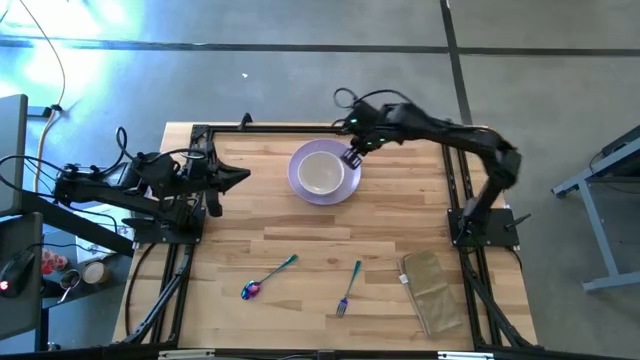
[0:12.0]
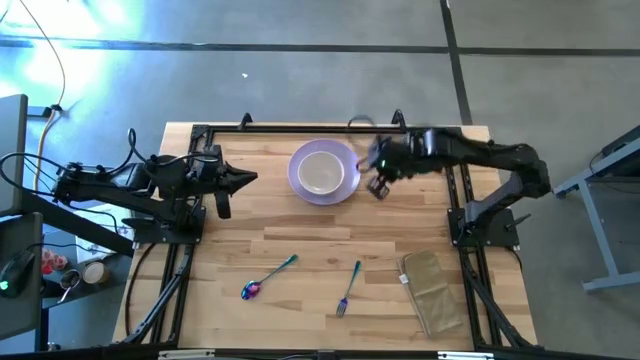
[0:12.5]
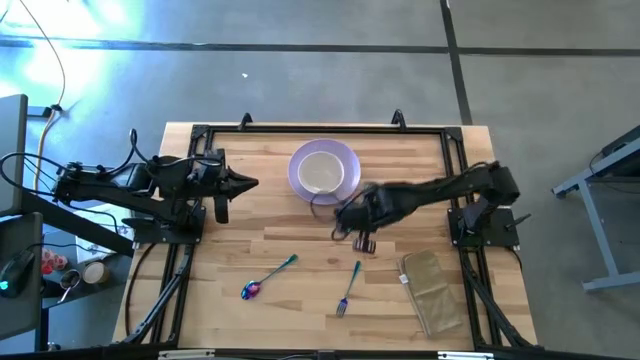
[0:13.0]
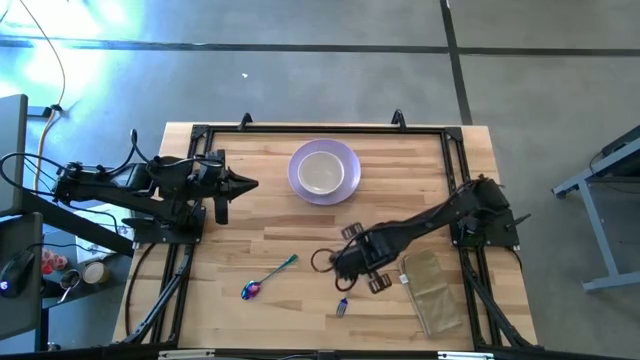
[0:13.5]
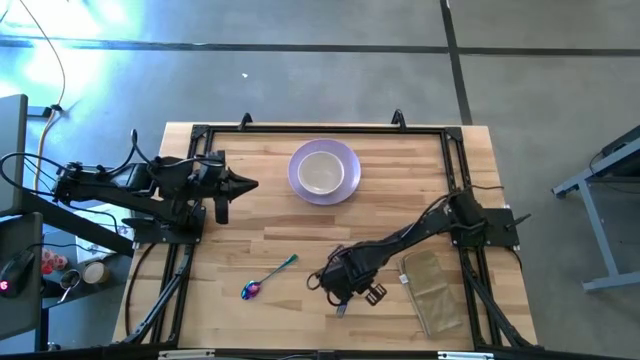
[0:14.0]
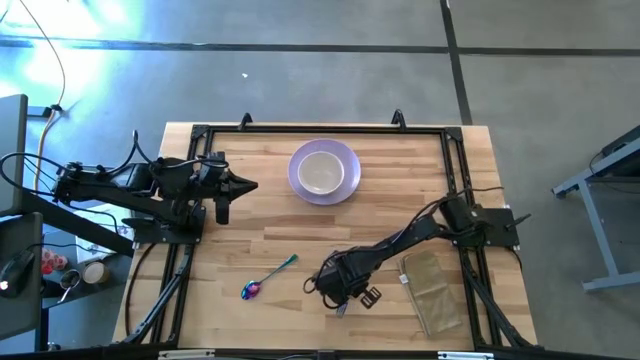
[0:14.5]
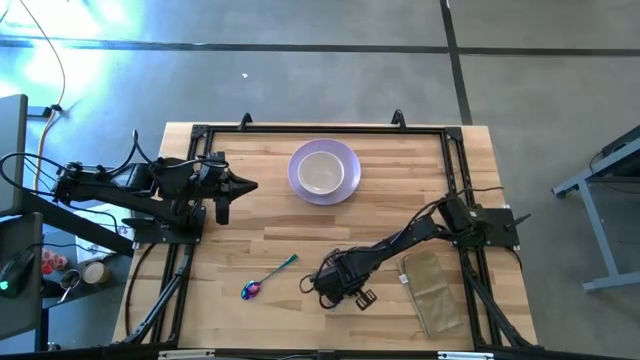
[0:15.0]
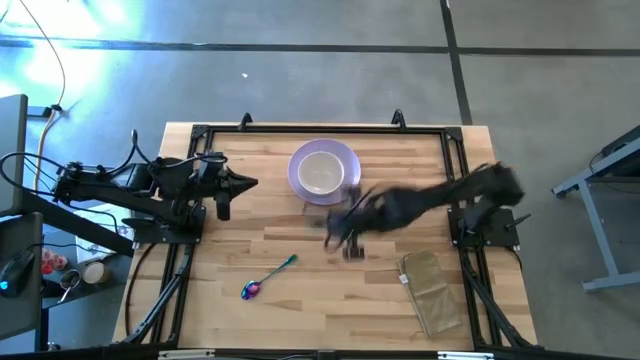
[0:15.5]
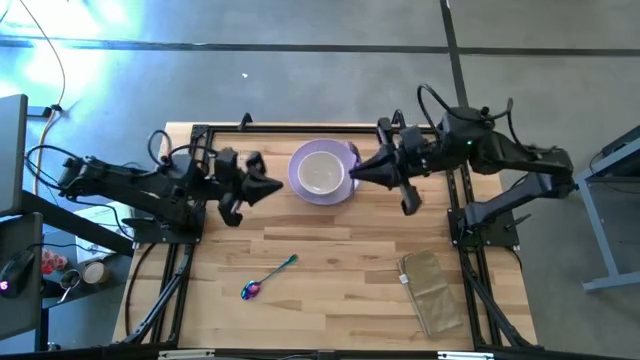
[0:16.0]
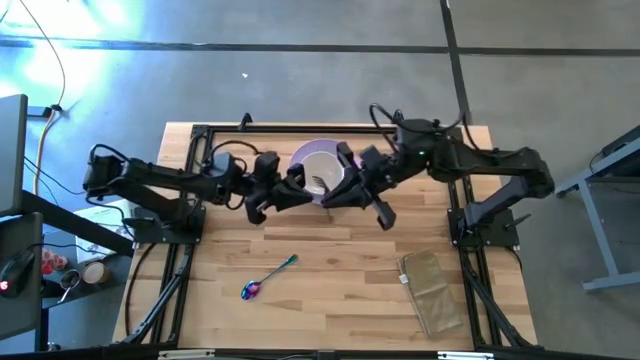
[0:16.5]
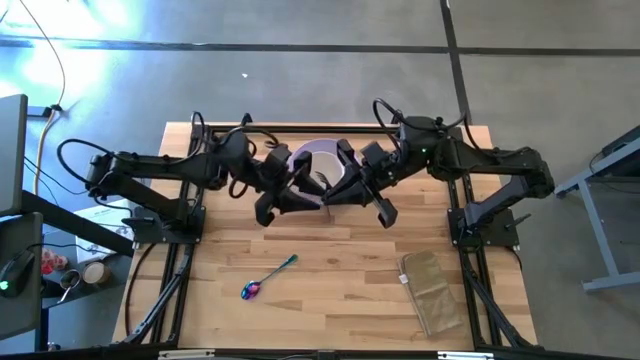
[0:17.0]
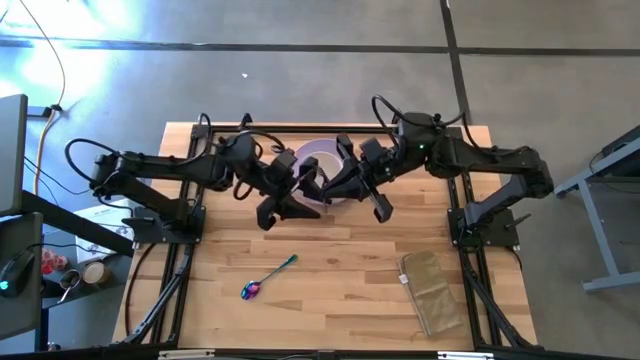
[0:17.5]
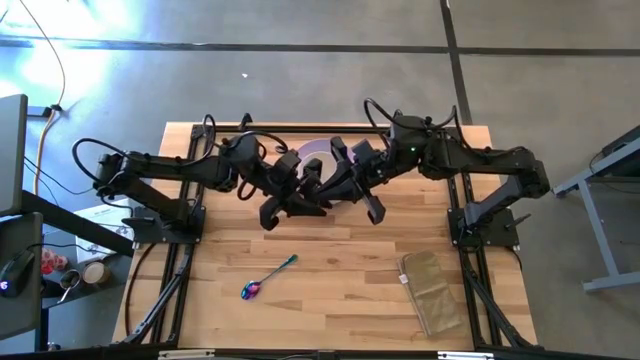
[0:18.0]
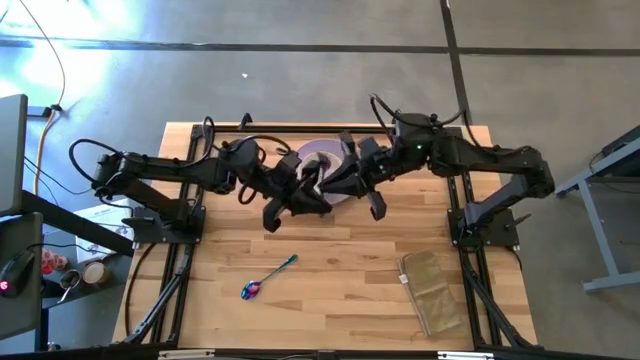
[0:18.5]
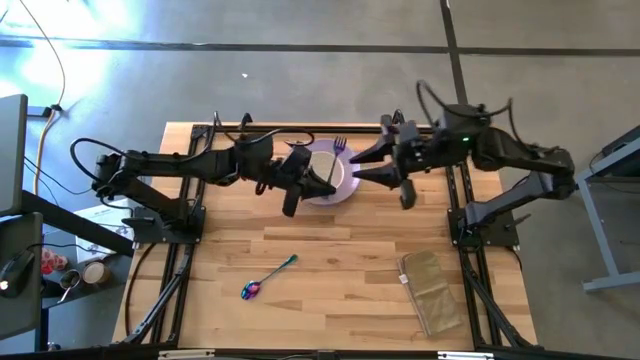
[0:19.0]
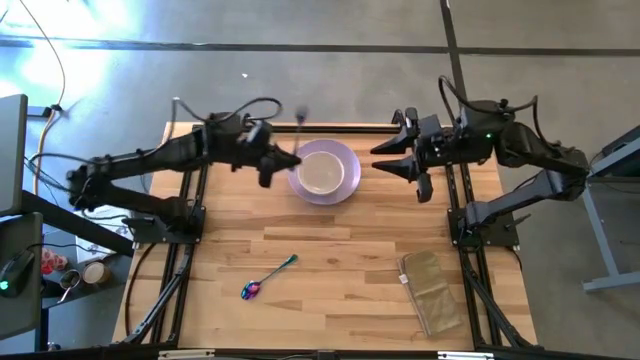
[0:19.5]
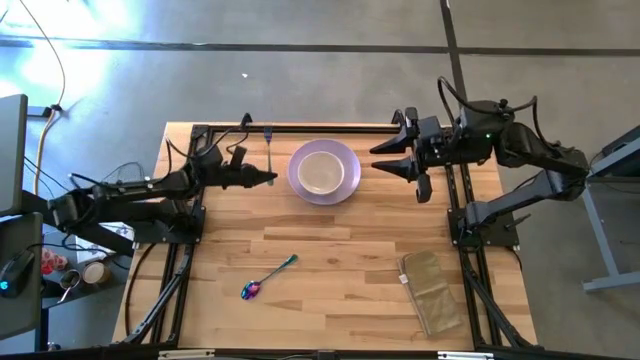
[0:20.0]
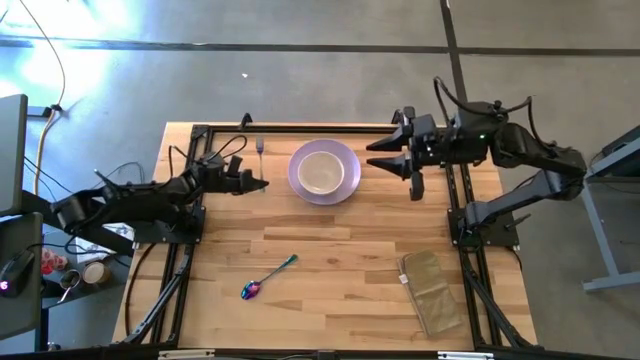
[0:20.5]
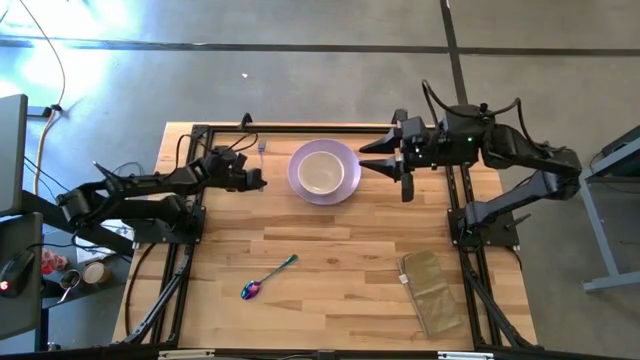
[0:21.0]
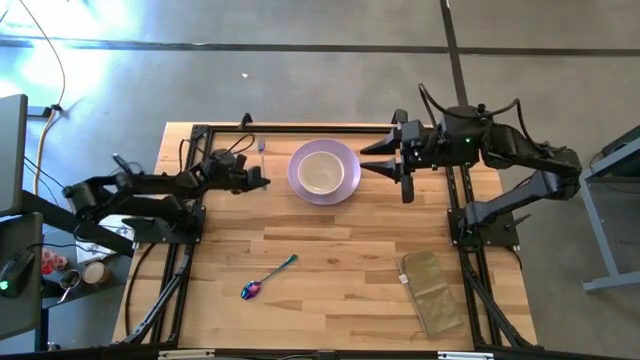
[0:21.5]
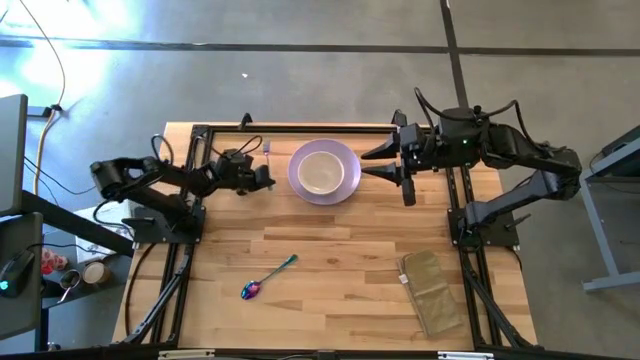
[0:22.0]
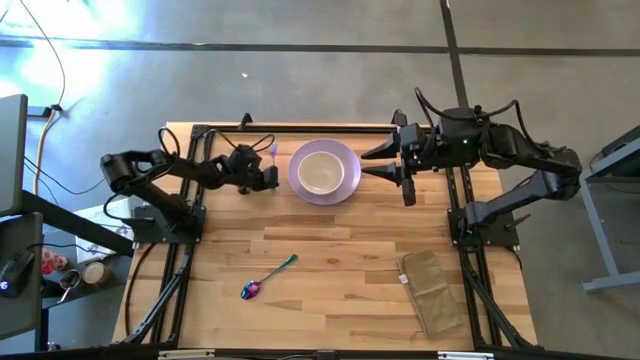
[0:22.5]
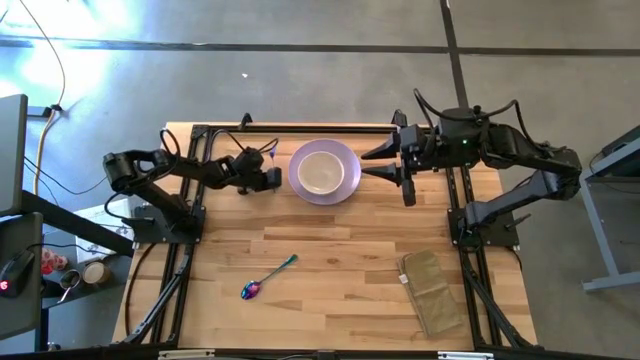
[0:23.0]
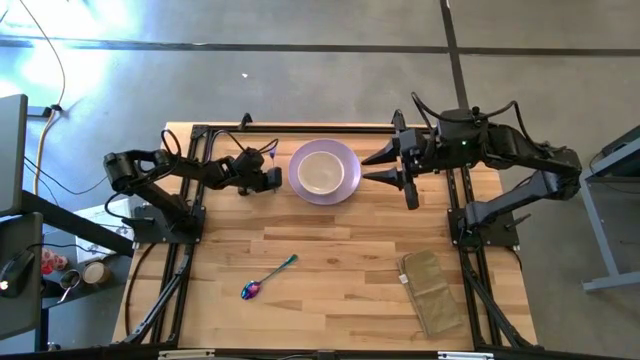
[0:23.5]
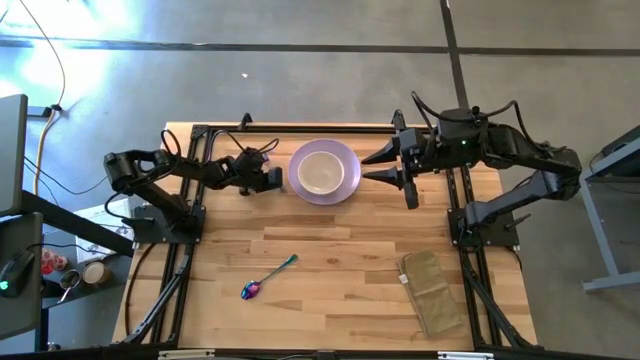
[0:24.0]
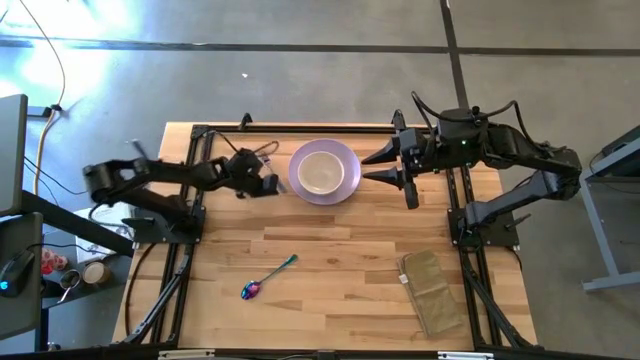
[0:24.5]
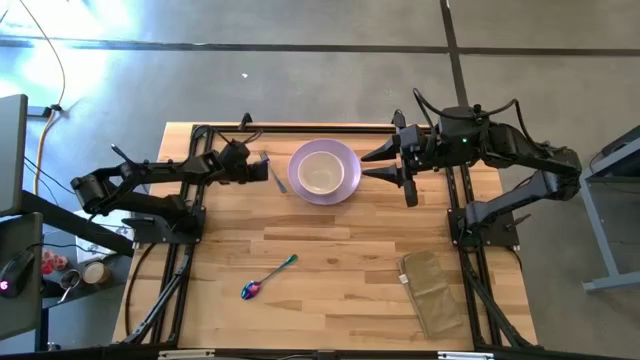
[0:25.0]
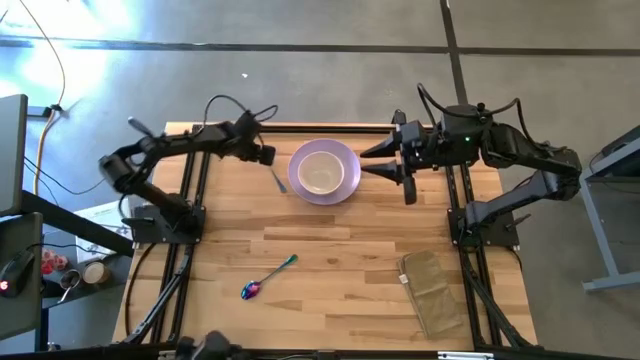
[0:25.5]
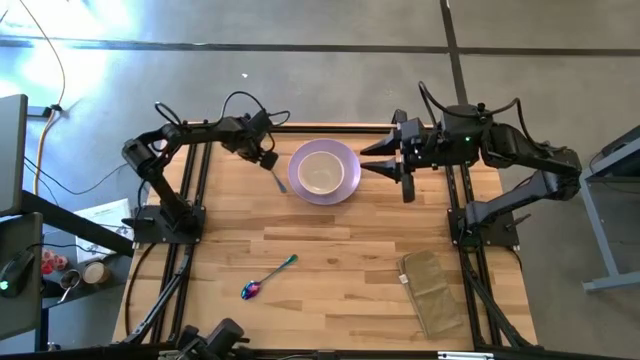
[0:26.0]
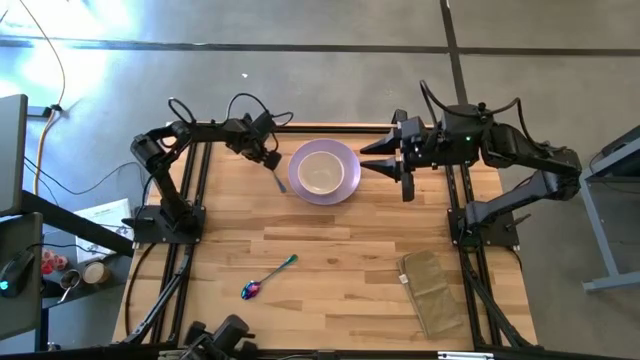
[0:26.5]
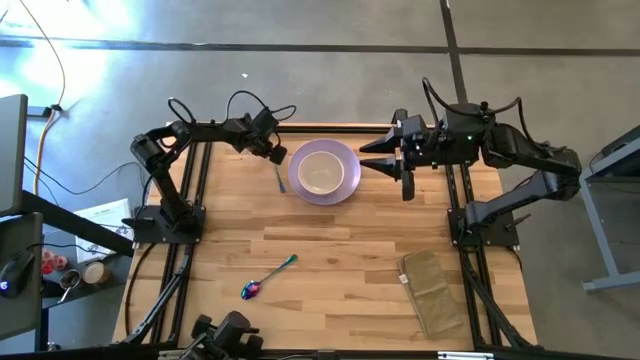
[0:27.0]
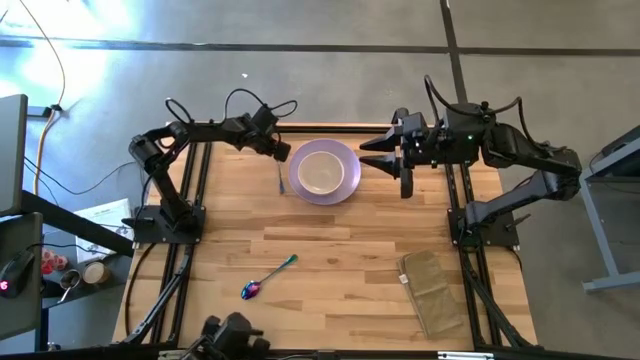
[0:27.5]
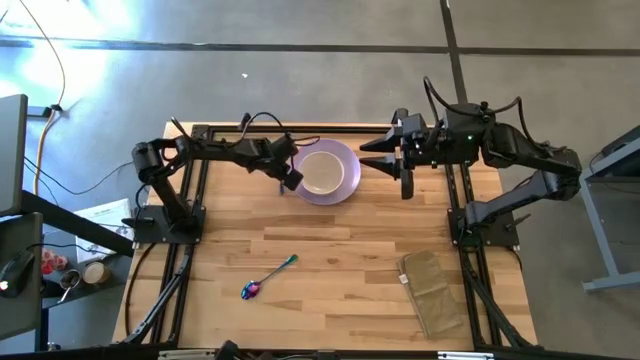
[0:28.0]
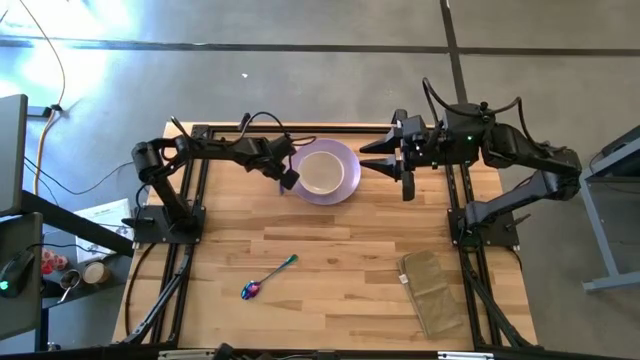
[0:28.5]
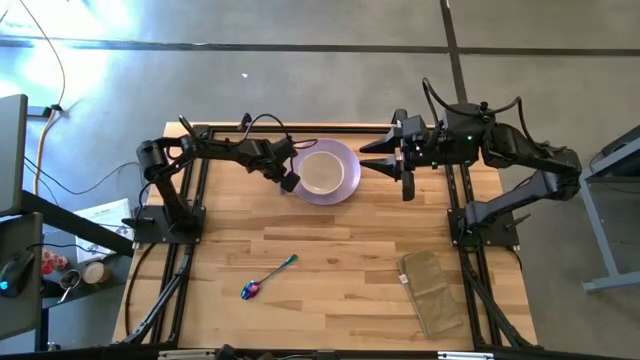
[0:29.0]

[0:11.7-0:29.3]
Task: Set table place
Put the violet fork to the left of the plate on the table

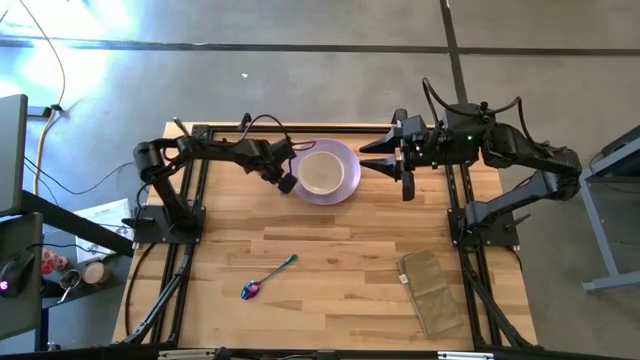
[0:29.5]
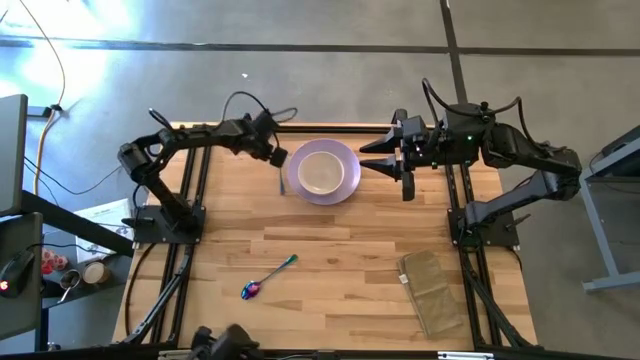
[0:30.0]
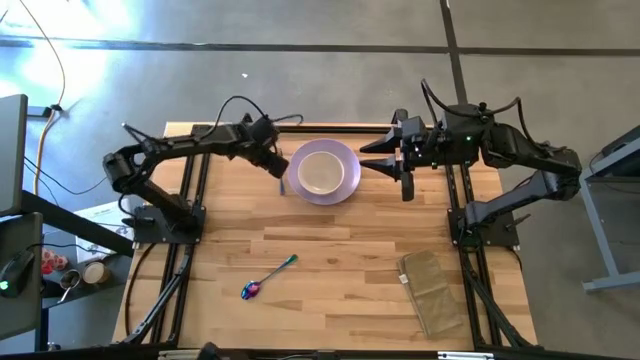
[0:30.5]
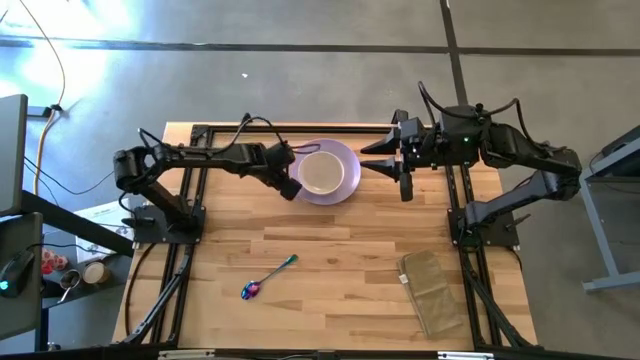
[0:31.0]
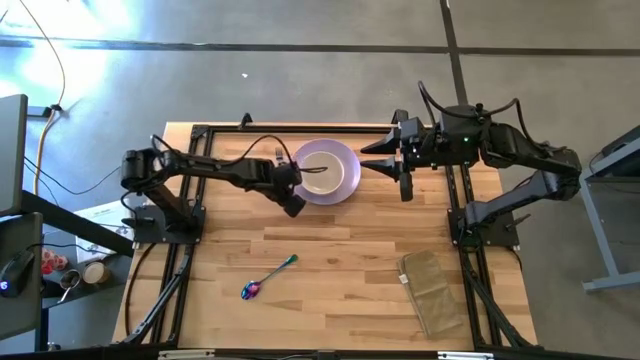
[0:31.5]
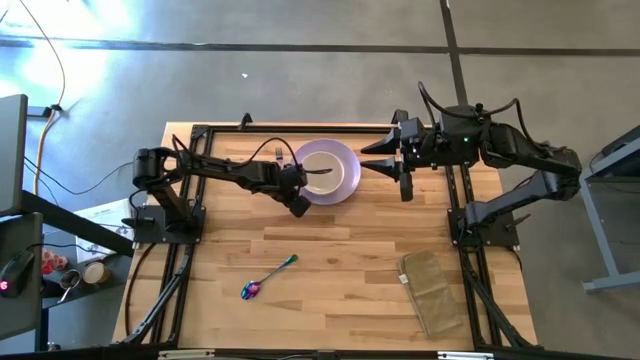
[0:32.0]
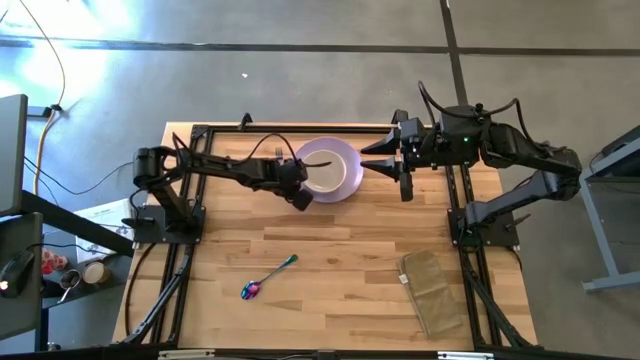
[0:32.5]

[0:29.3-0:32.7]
Adjust the violet plate
